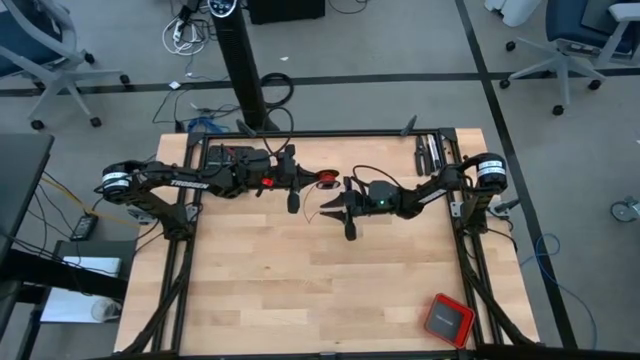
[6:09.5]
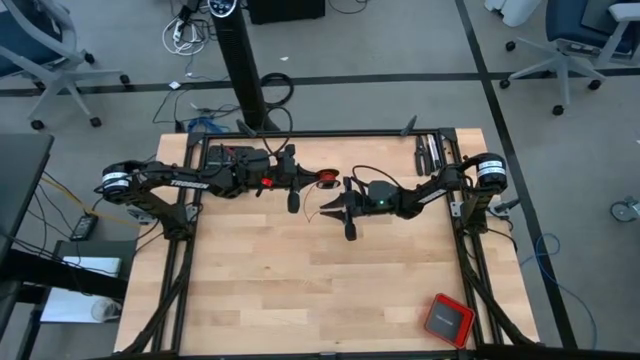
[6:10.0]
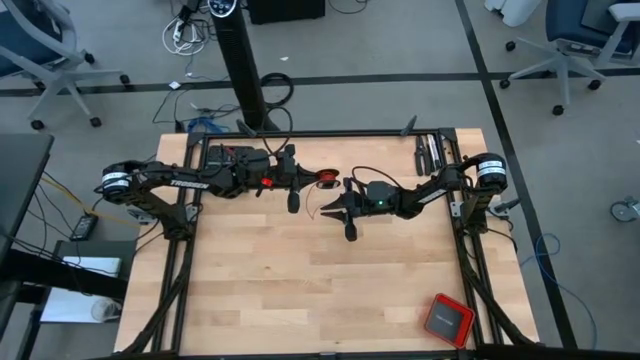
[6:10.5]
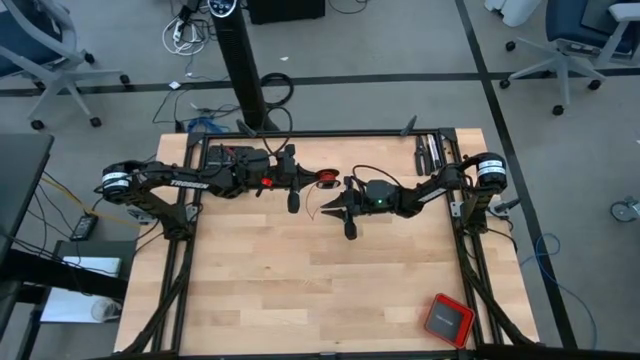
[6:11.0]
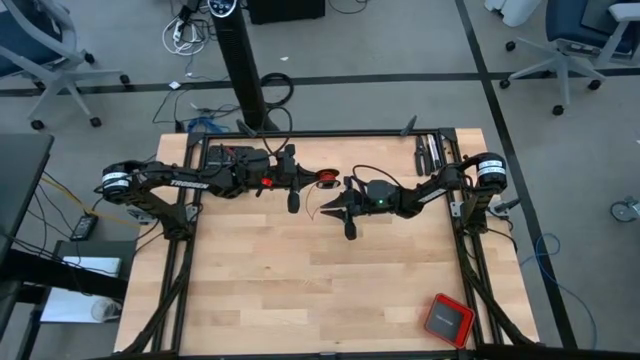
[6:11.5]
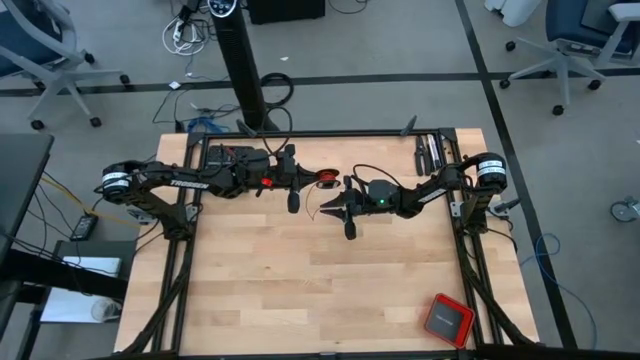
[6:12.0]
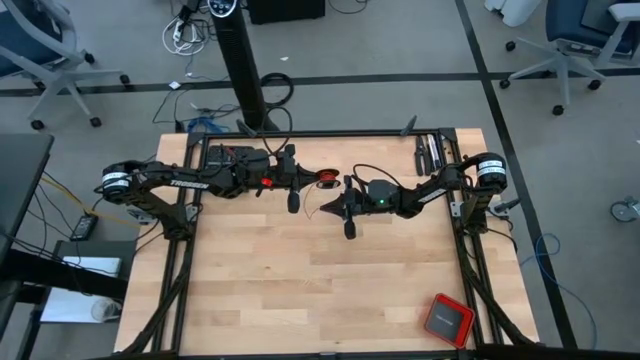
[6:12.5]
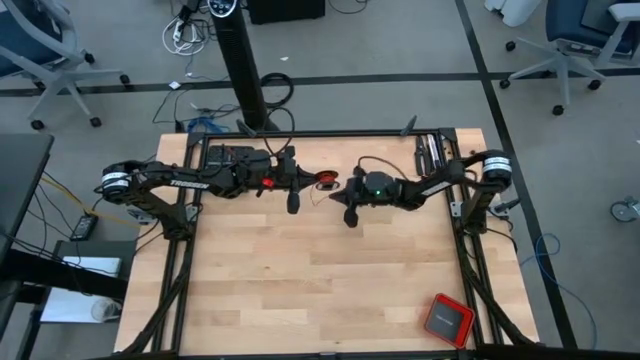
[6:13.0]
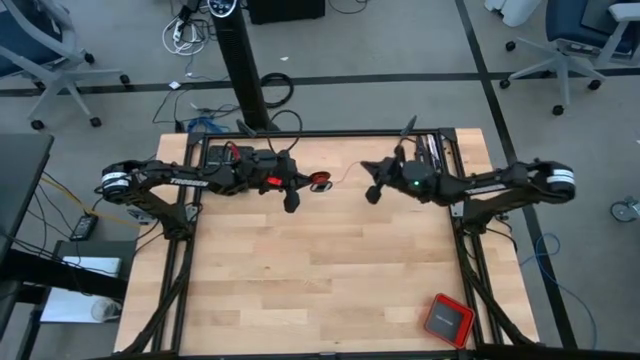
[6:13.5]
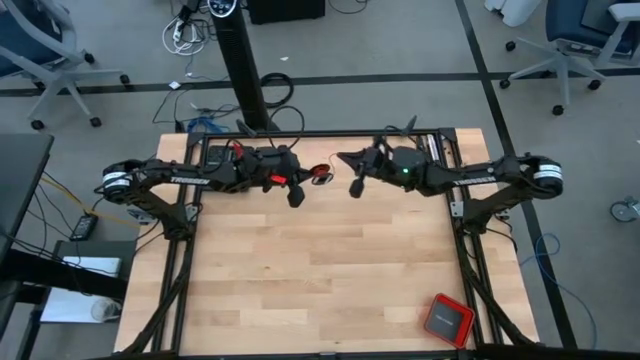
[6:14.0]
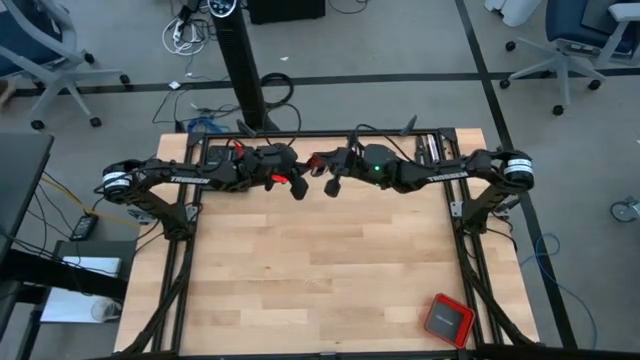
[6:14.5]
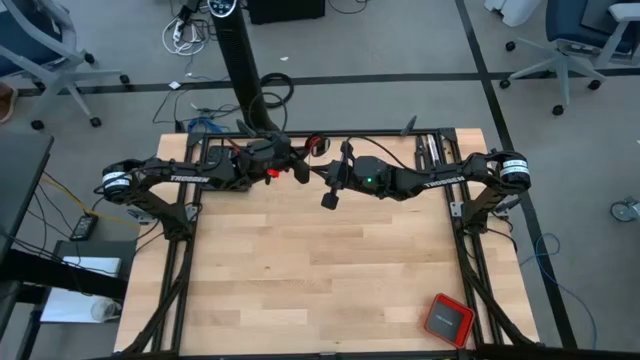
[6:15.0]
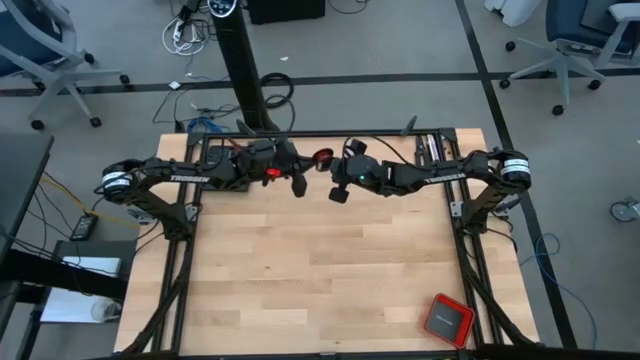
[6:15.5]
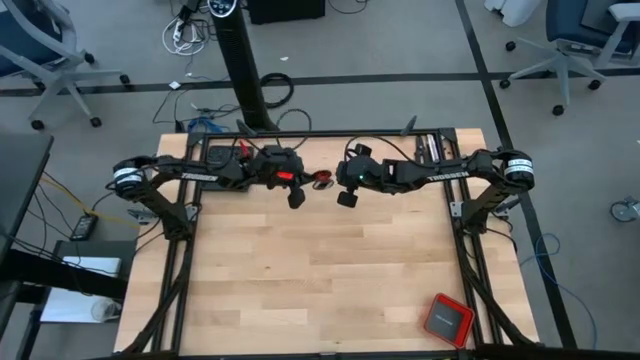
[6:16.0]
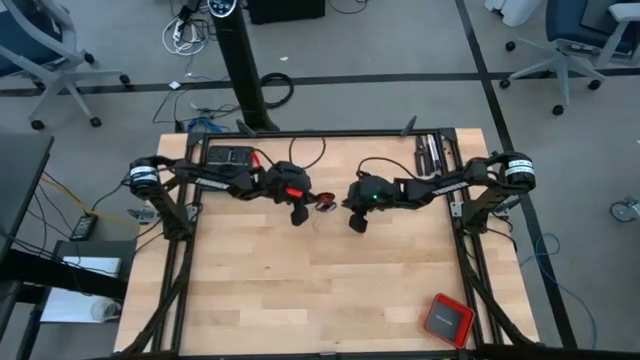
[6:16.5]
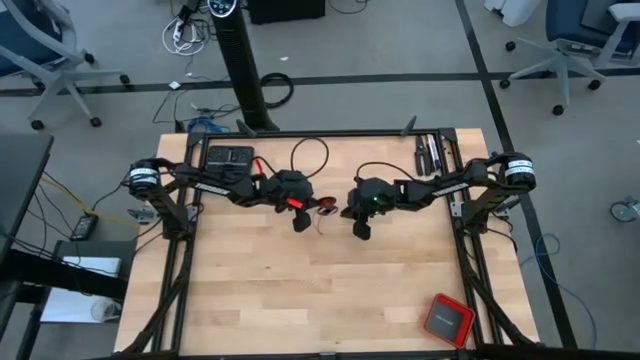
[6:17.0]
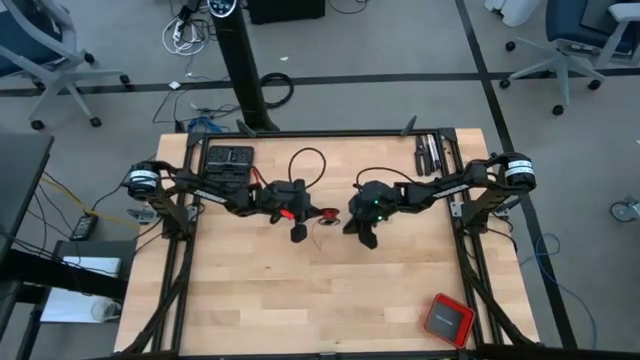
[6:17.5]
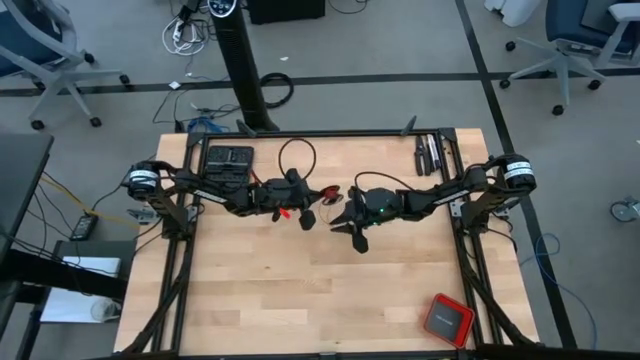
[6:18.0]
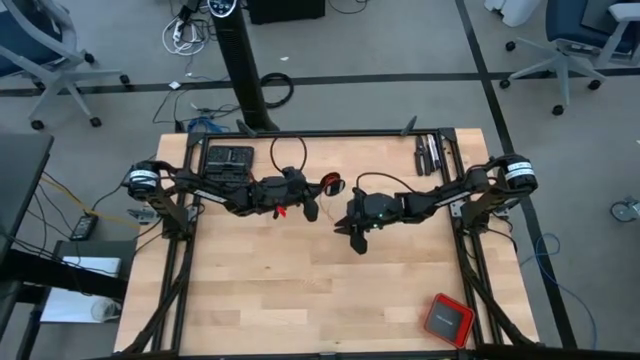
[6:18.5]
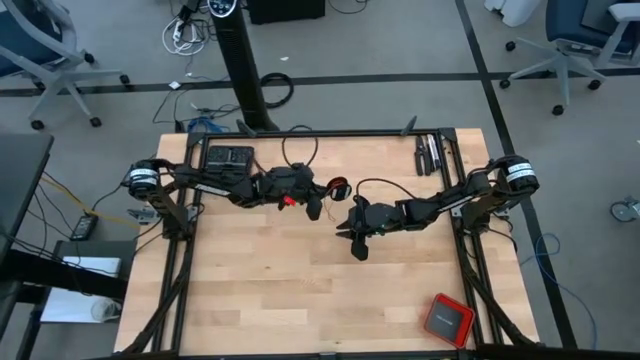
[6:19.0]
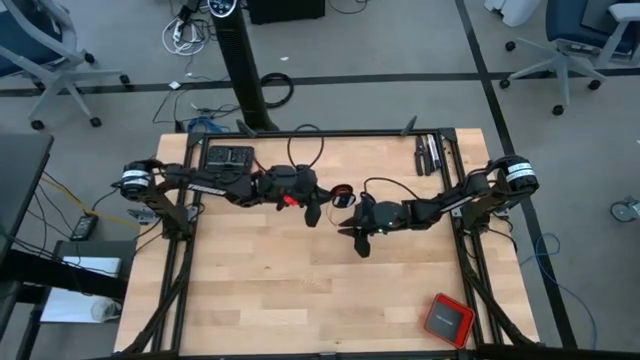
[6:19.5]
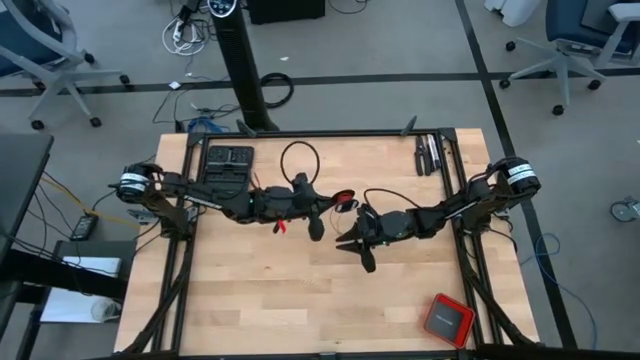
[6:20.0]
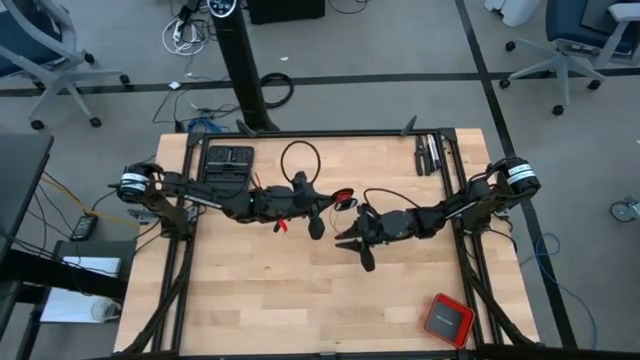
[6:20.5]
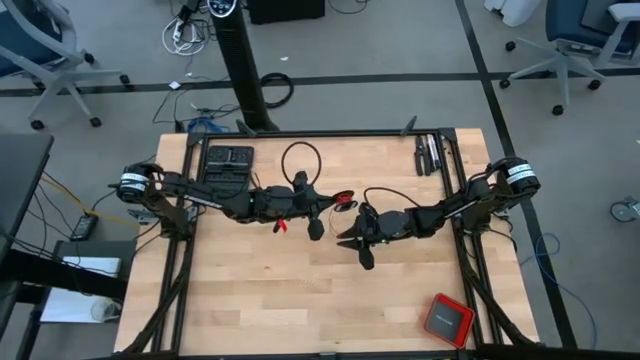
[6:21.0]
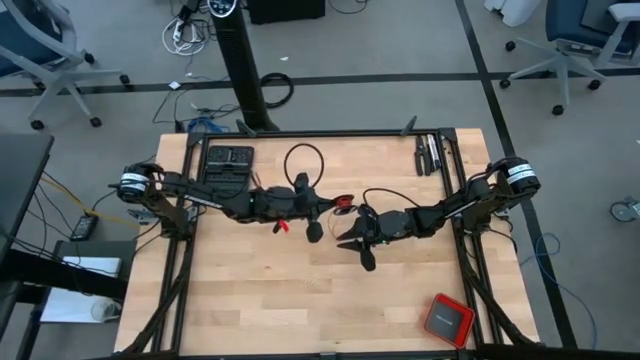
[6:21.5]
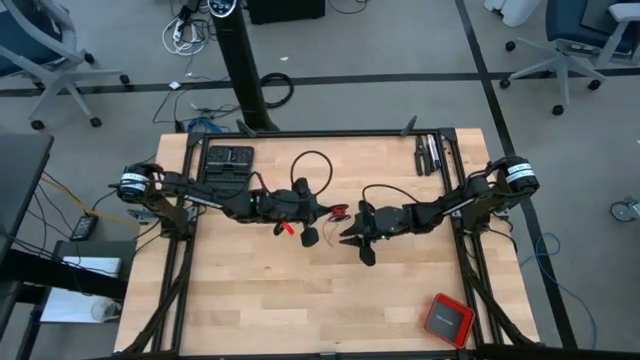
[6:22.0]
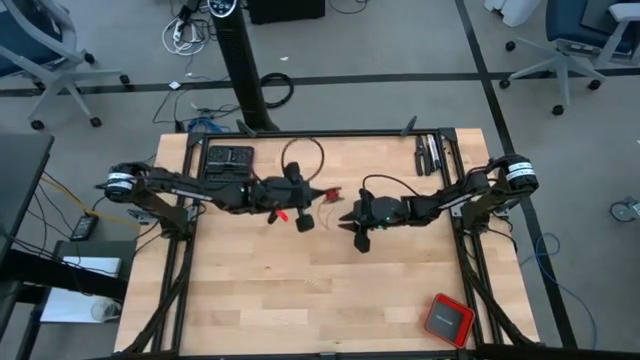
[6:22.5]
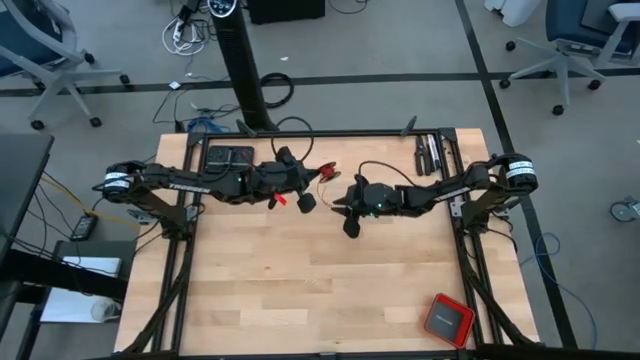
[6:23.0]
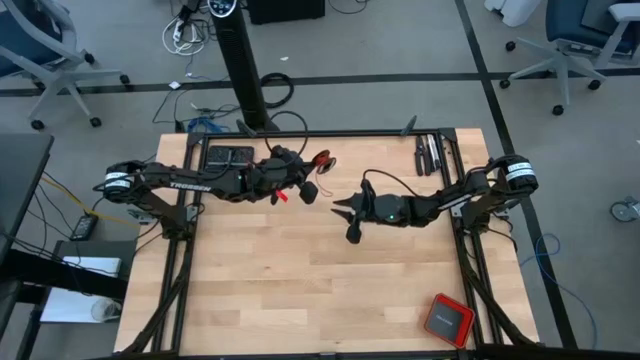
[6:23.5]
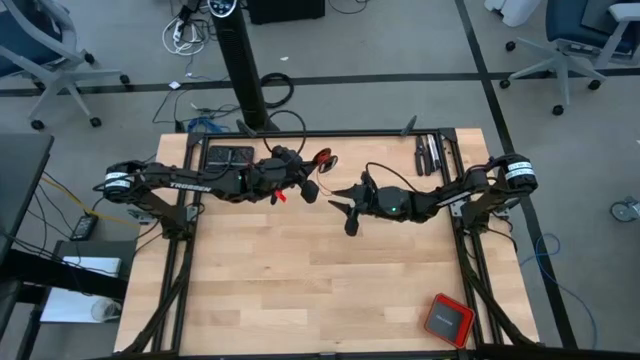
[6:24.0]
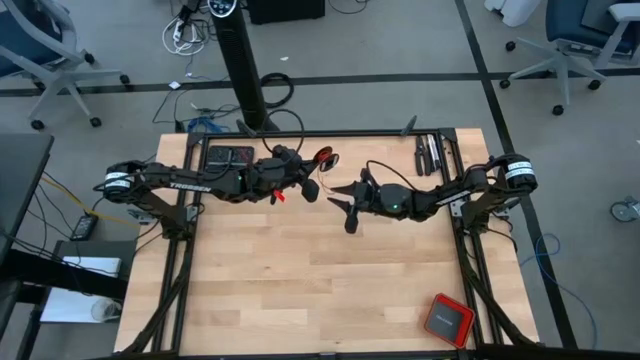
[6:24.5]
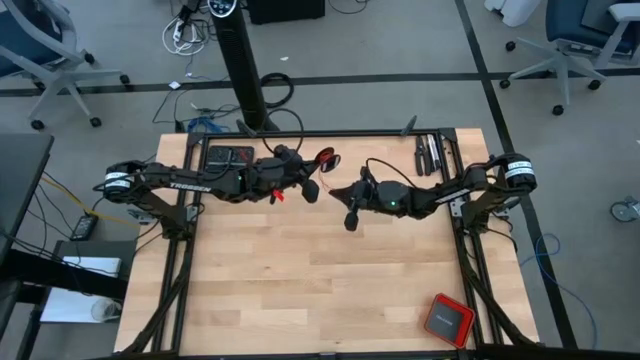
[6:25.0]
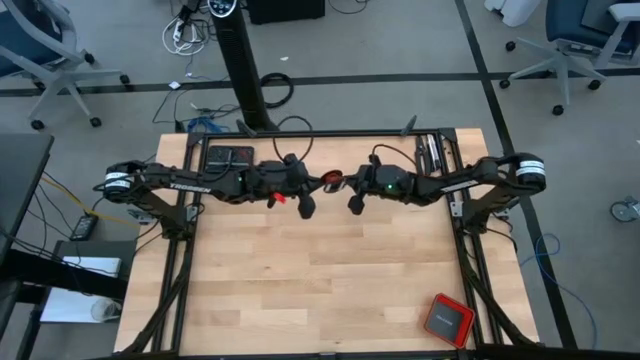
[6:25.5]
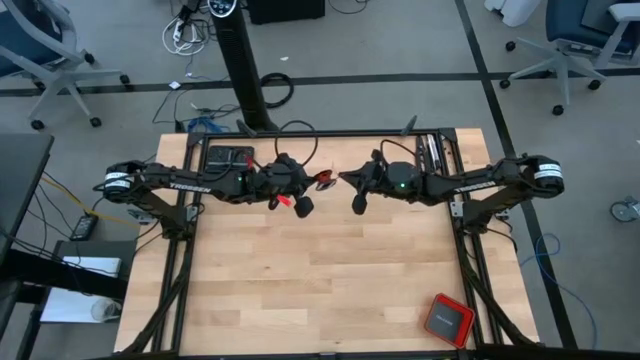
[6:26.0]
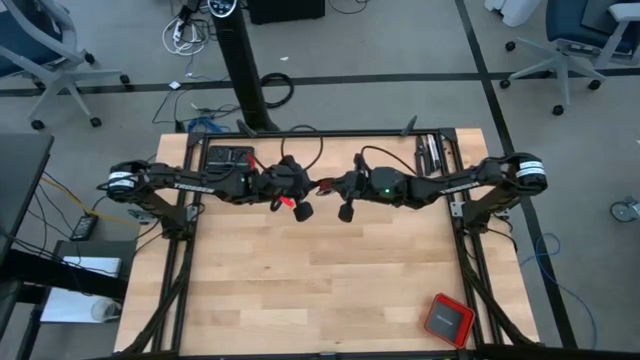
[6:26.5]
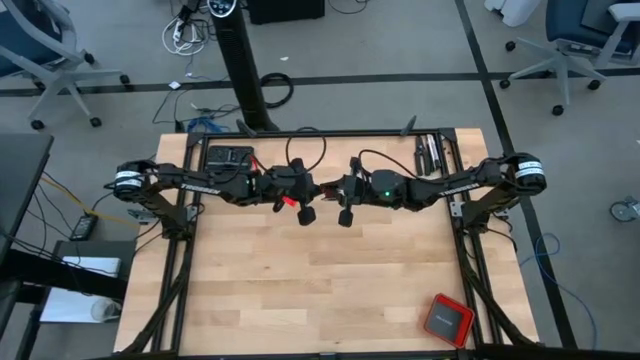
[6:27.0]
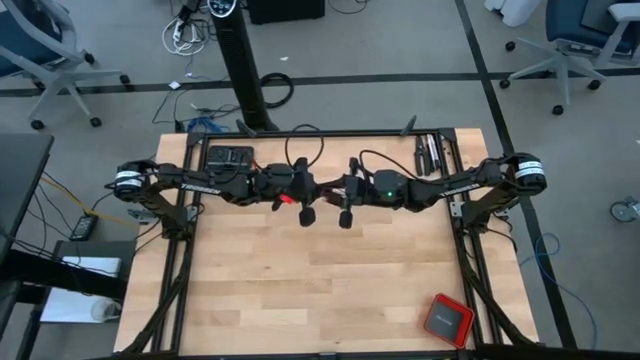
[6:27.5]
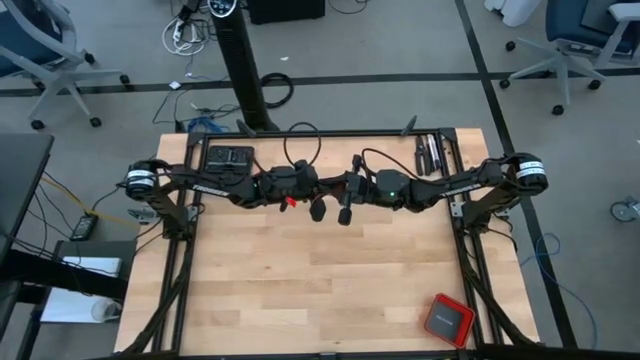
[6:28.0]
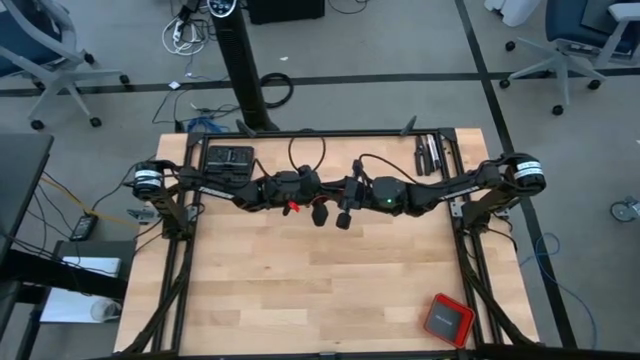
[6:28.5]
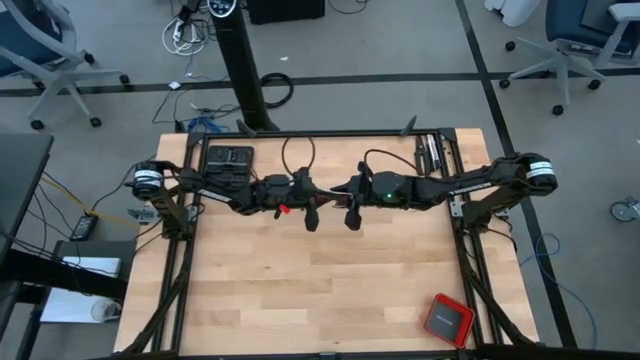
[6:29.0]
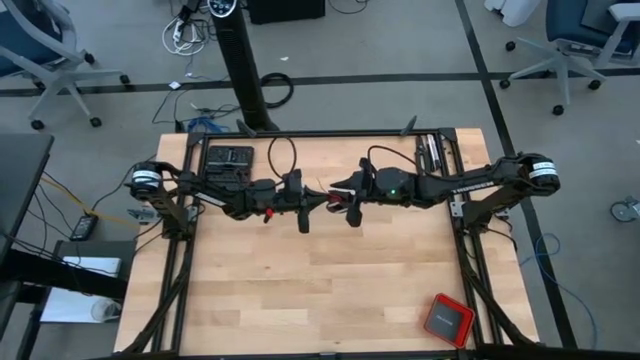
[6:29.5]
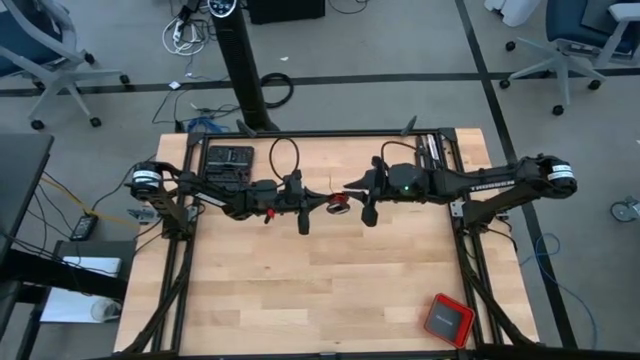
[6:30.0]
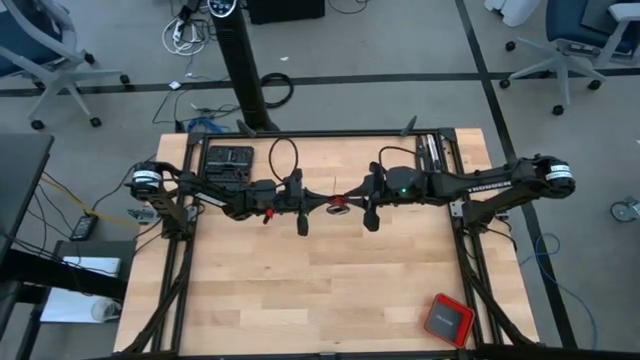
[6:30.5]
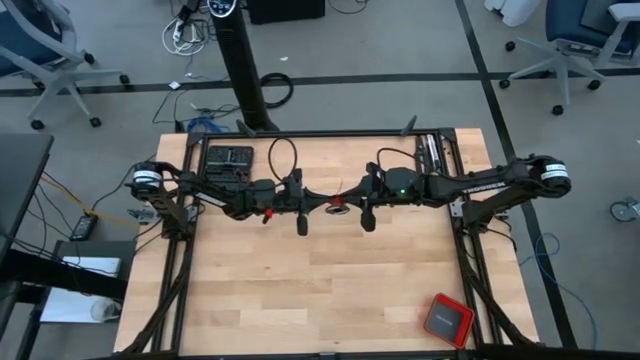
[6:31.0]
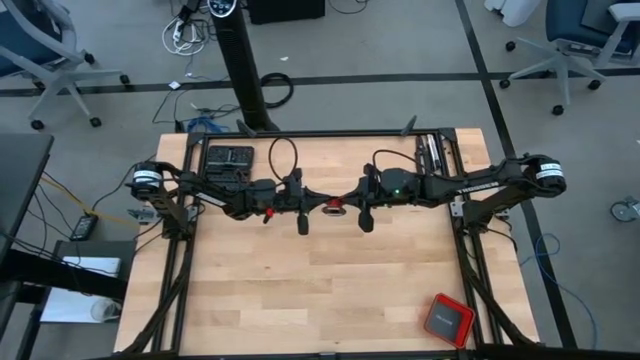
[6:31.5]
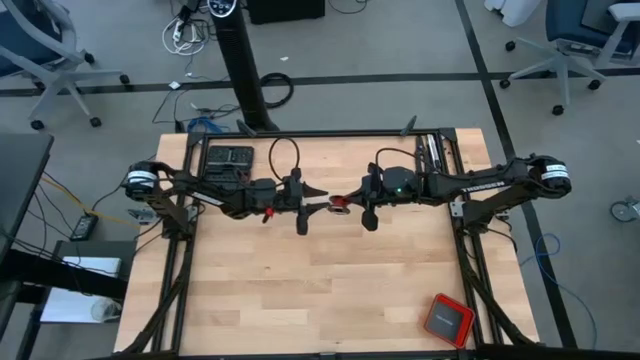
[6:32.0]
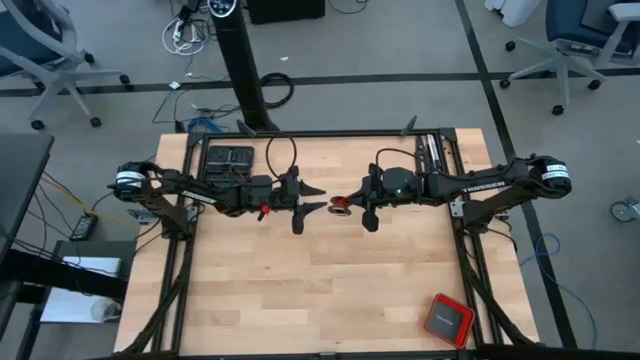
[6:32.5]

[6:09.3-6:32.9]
Task: Coil cords
Coil the red wire onto the spool
